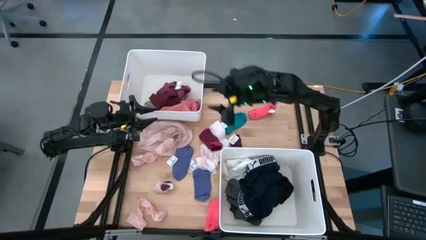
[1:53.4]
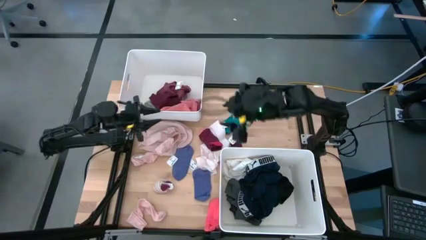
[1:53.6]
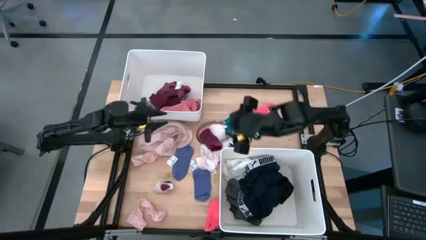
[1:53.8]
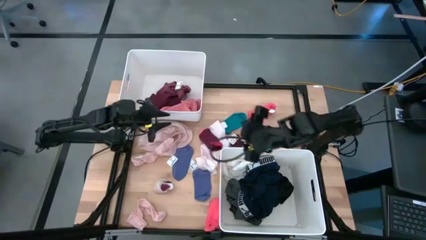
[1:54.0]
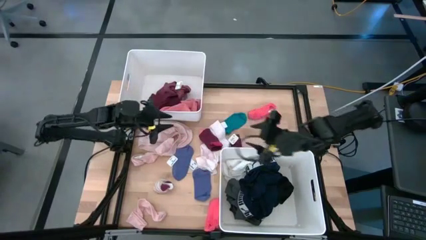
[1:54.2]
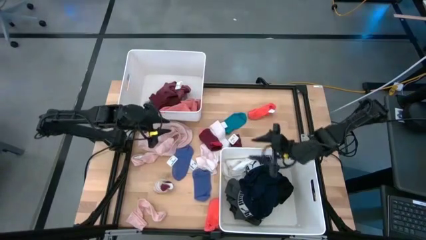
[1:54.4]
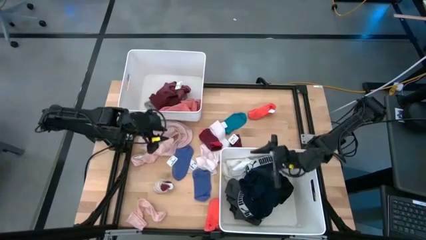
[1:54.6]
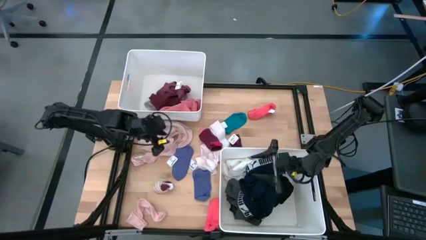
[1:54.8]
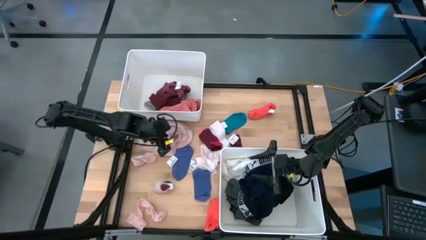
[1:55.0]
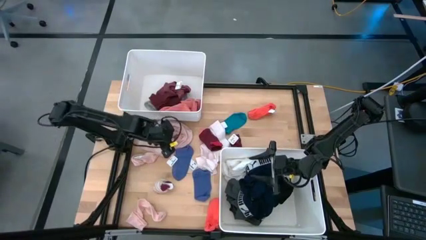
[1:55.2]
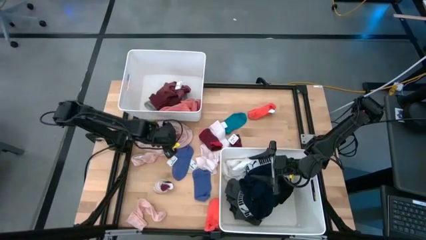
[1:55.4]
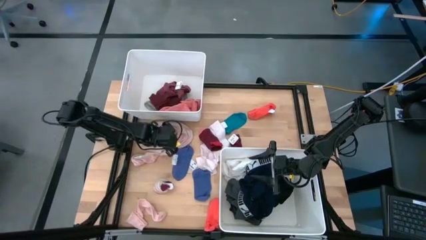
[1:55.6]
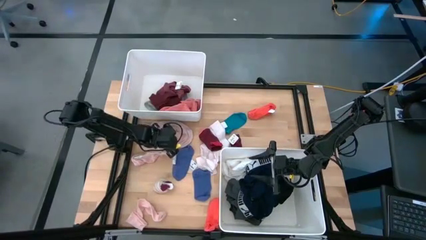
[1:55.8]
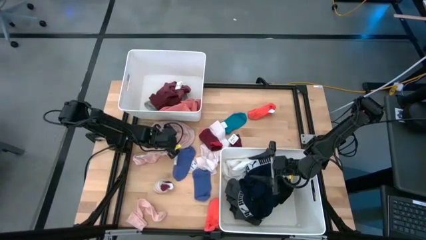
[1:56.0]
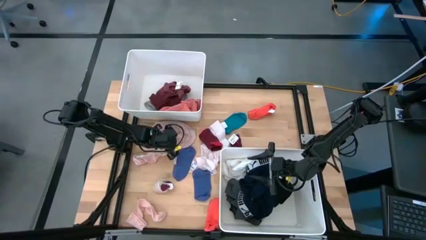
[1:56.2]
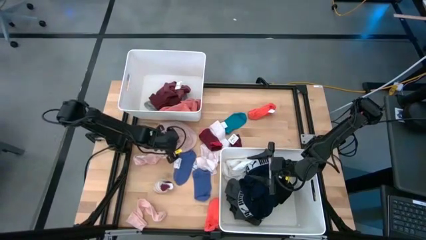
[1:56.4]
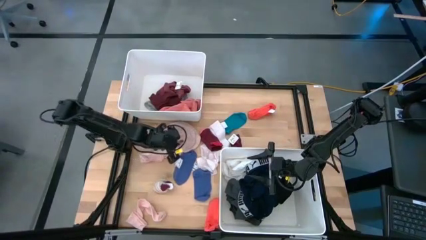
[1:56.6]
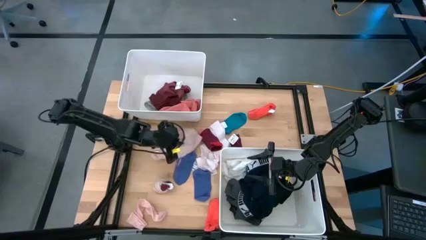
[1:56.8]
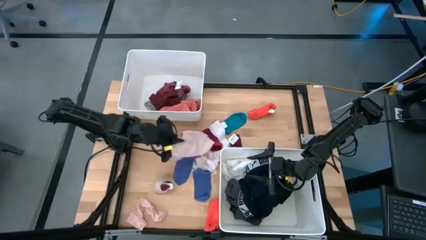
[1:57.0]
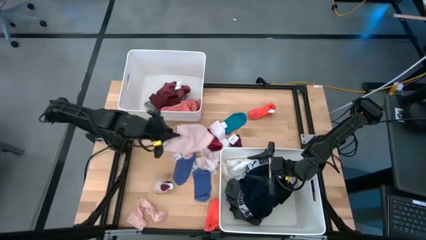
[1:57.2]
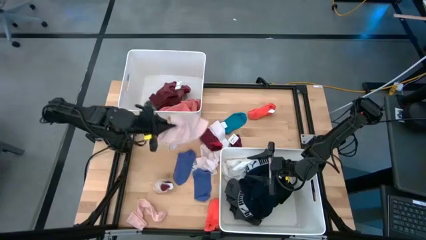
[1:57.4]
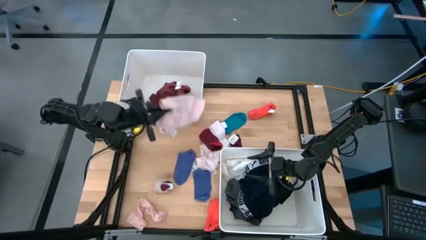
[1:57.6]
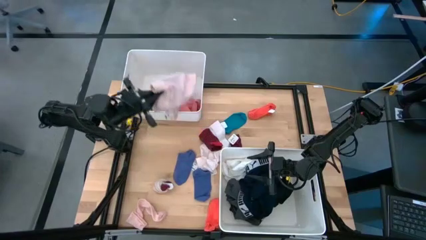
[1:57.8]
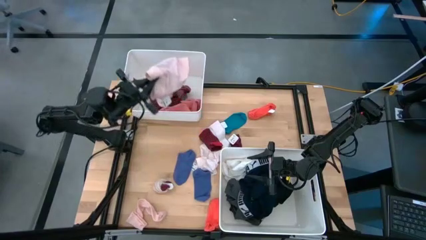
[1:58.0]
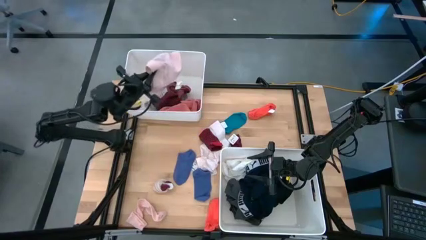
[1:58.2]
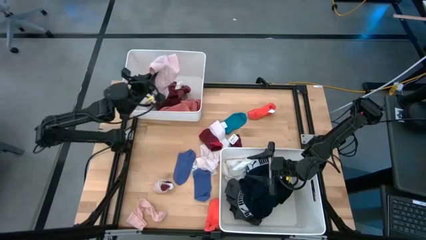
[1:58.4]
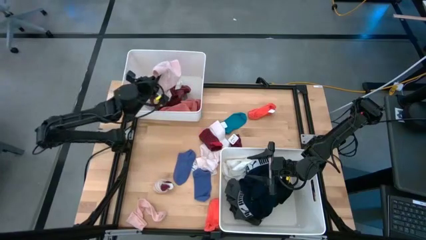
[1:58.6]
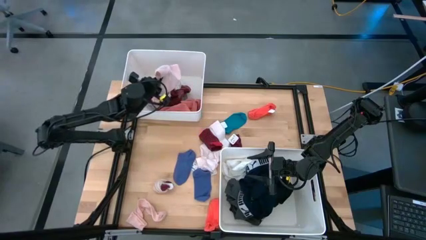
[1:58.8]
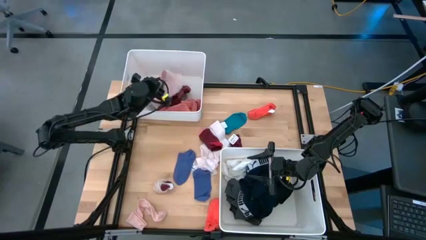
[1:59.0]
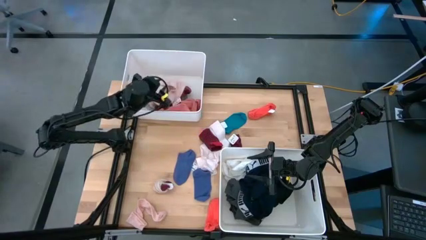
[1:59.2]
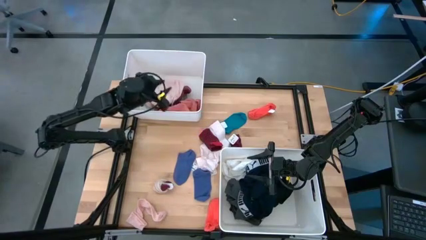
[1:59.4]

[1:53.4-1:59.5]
Task: Sort clothes
Put the pink underwear into the top white bin

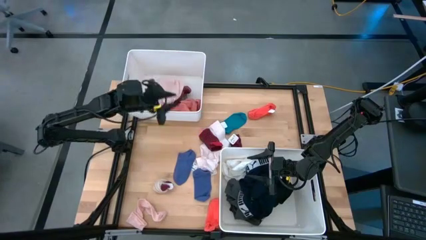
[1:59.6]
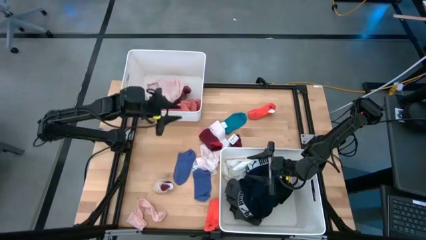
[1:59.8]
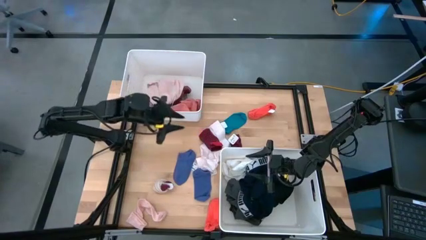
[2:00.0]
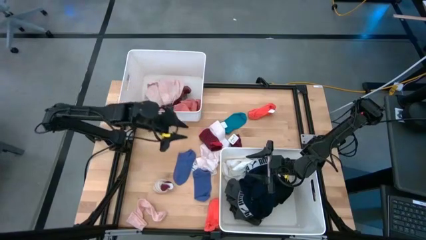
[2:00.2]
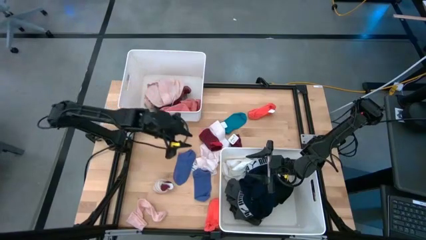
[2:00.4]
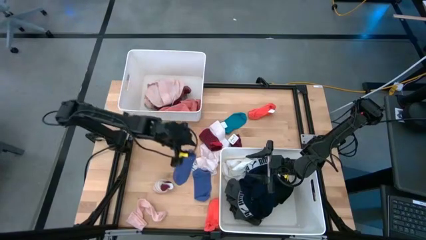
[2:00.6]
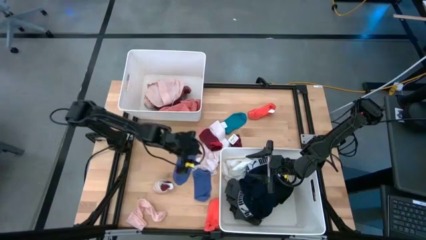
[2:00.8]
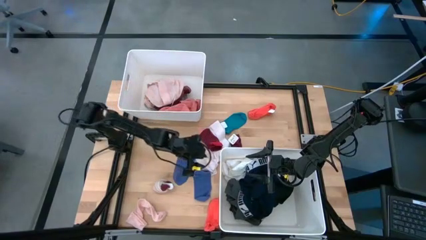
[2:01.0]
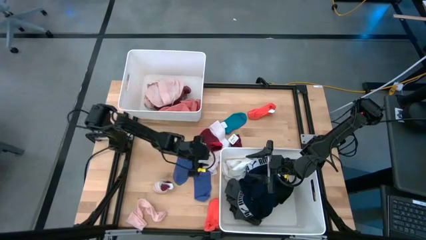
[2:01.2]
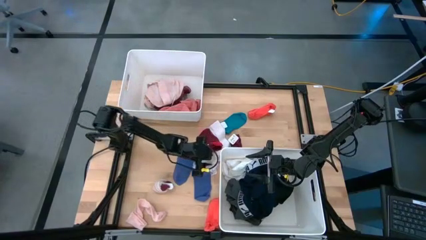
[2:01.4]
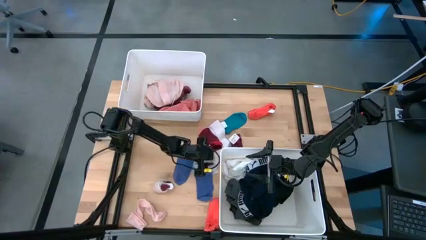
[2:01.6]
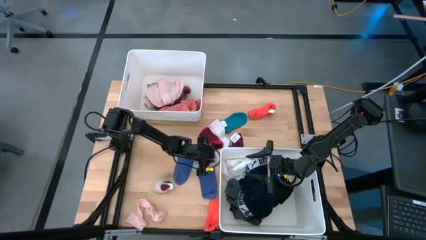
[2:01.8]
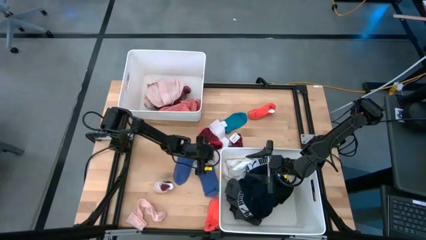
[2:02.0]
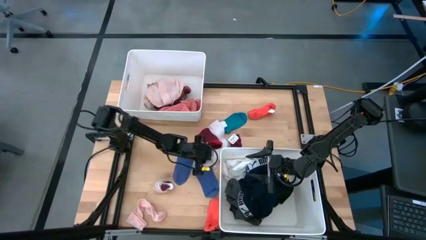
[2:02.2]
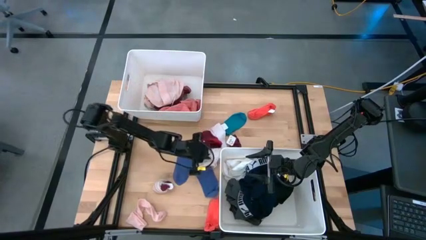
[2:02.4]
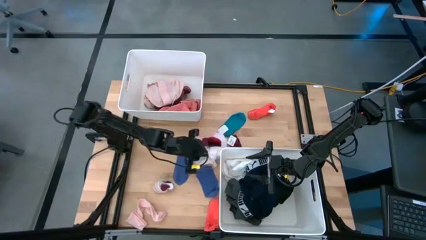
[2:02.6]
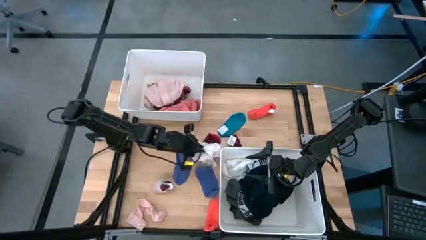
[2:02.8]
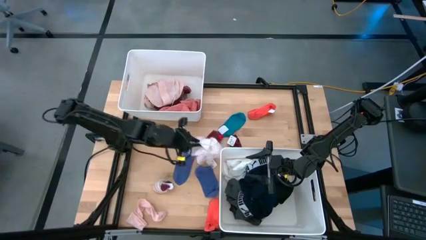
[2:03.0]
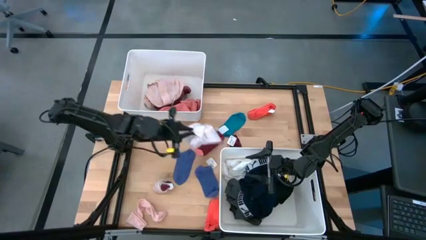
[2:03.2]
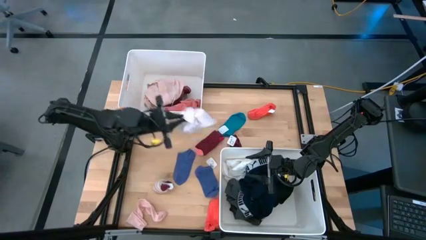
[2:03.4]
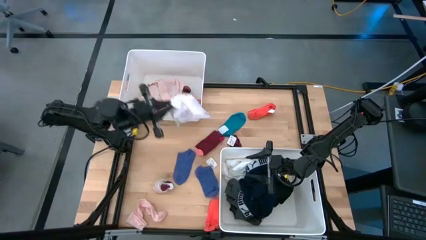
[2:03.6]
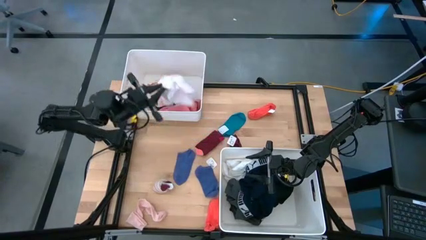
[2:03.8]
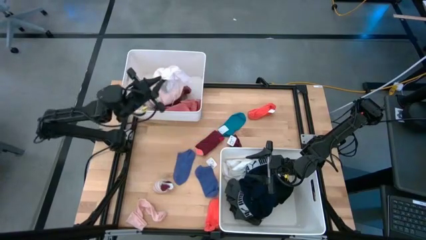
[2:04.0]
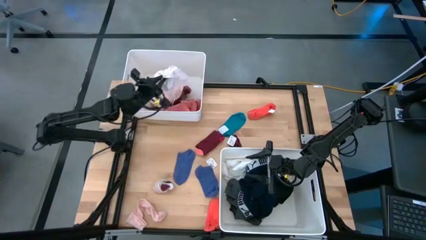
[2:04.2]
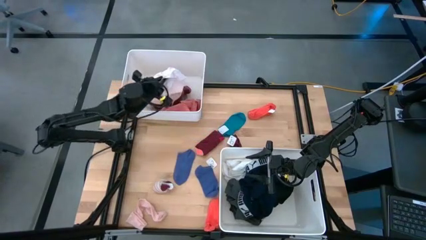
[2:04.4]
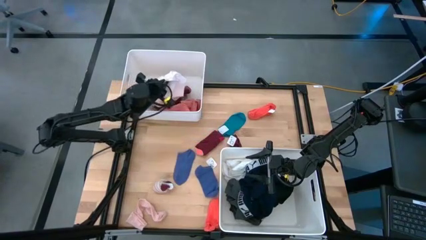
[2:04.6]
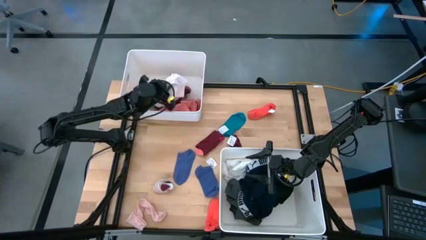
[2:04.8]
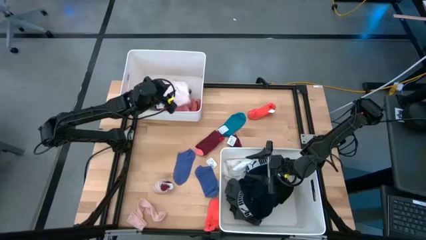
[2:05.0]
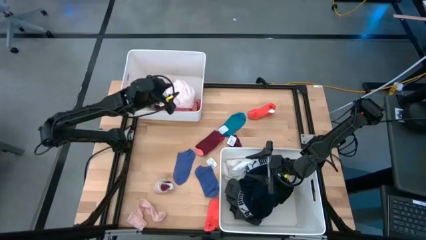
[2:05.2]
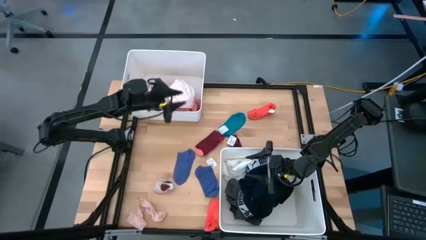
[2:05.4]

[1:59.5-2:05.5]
Put the white underwear into the top white bin

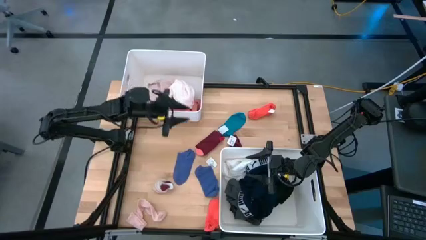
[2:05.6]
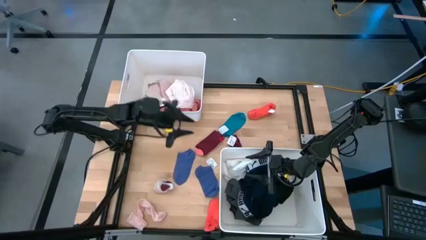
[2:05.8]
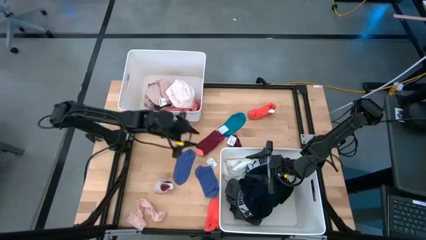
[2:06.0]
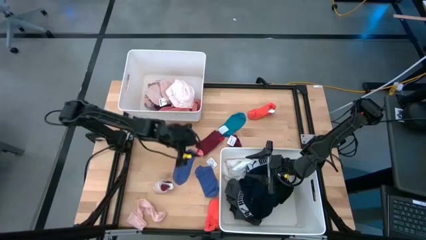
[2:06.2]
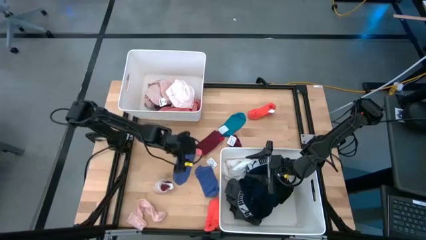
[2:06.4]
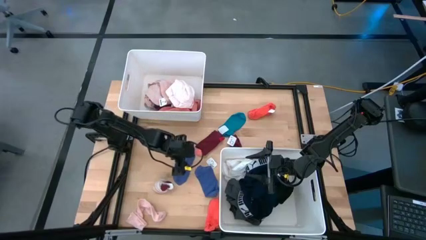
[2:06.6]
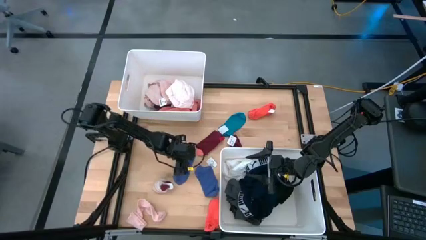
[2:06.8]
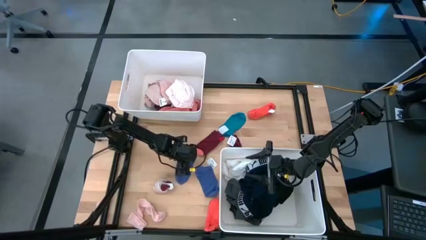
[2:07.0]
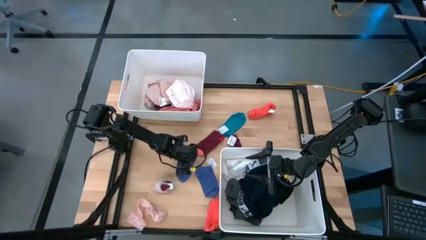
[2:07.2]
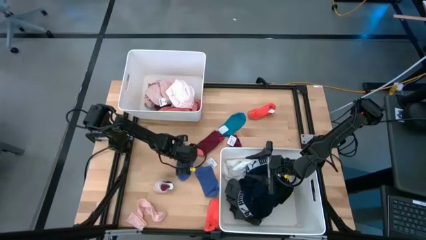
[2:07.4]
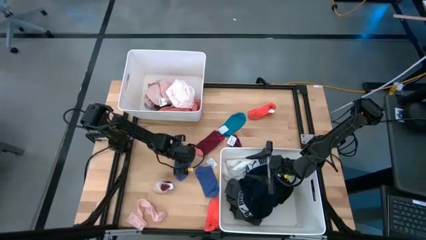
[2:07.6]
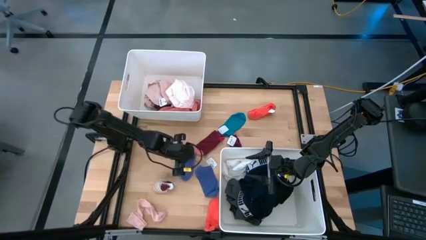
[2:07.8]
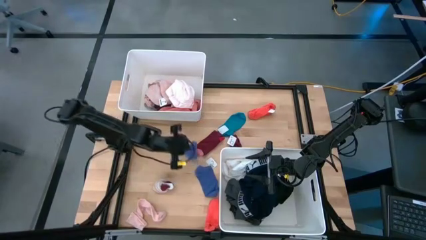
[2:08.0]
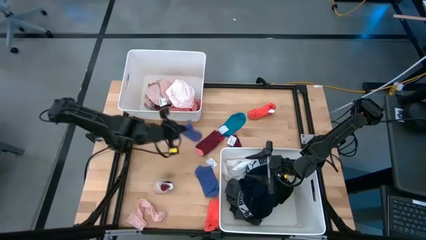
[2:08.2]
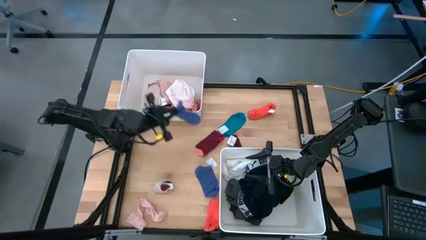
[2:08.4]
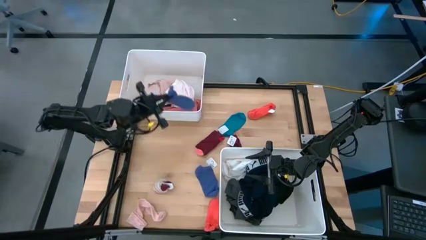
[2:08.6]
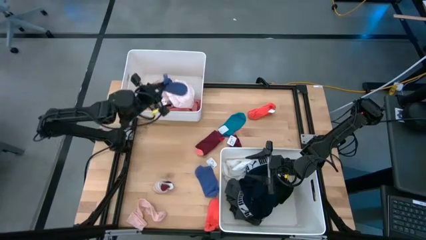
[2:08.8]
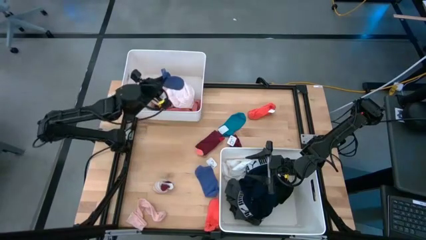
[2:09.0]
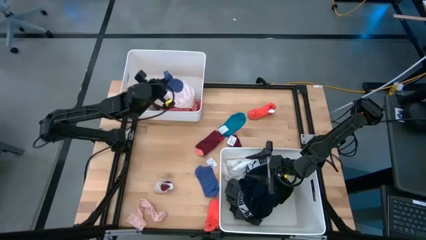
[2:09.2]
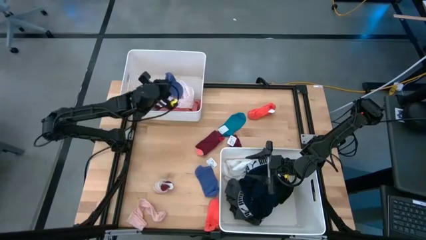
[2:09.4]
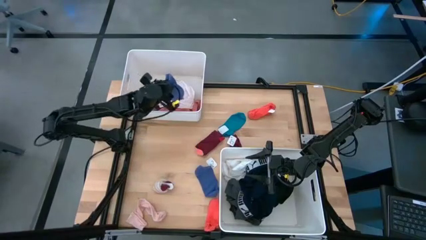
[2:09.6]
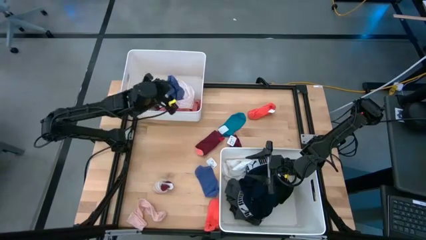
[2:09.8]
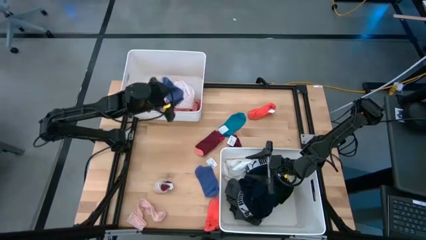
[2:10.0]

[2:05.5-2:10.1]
Put the blue sock into the top white bin
